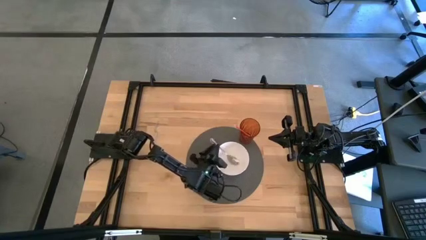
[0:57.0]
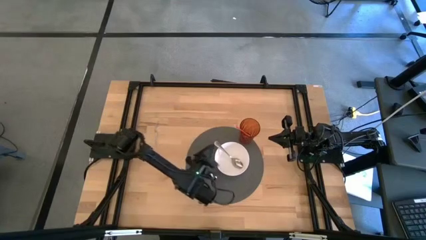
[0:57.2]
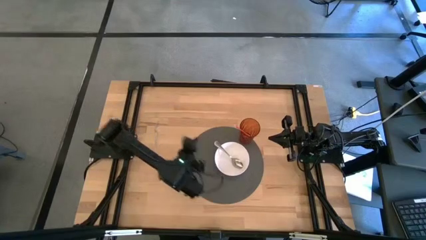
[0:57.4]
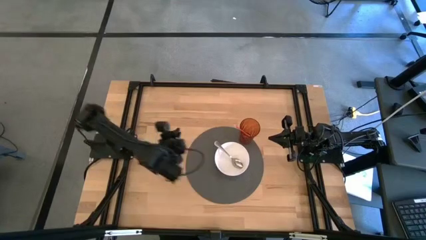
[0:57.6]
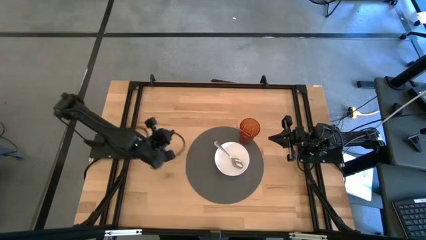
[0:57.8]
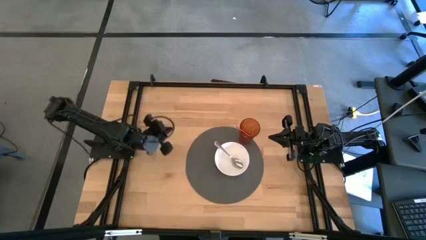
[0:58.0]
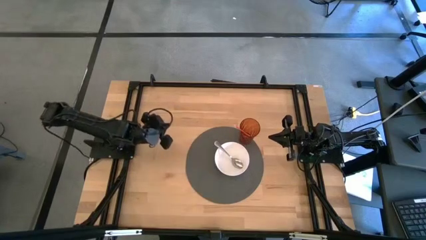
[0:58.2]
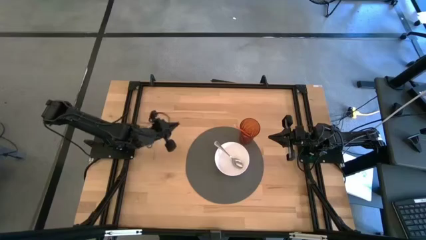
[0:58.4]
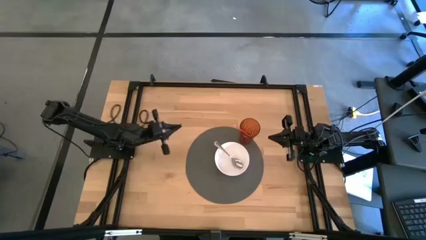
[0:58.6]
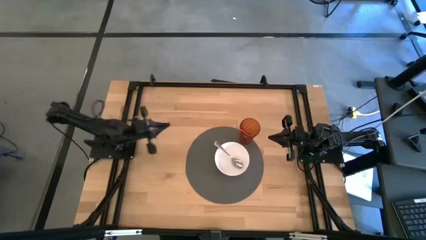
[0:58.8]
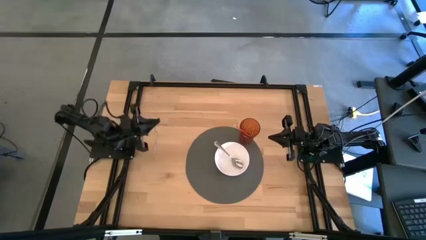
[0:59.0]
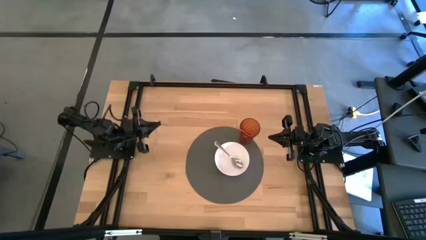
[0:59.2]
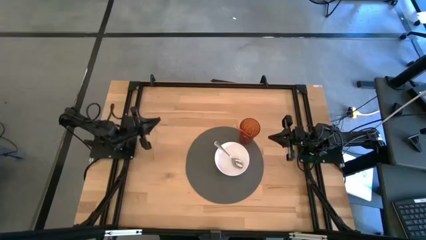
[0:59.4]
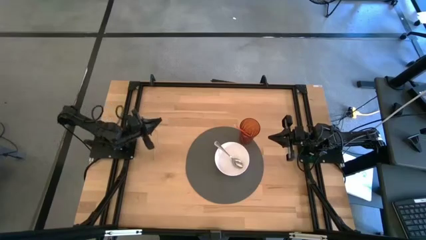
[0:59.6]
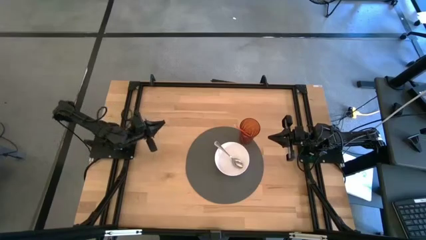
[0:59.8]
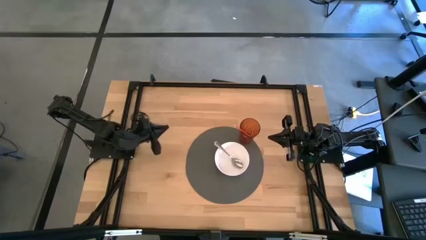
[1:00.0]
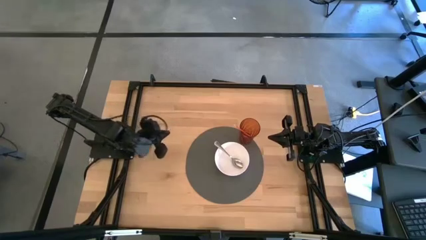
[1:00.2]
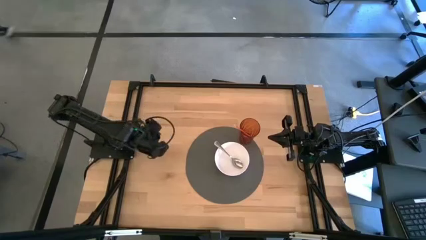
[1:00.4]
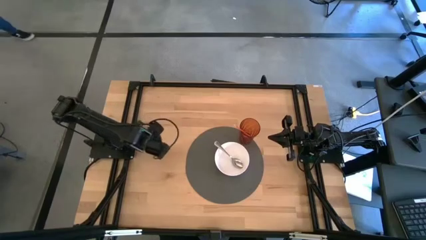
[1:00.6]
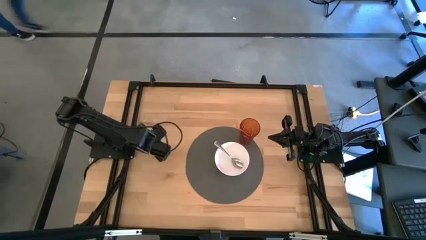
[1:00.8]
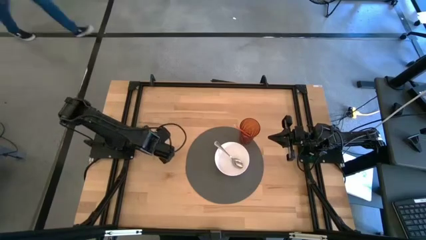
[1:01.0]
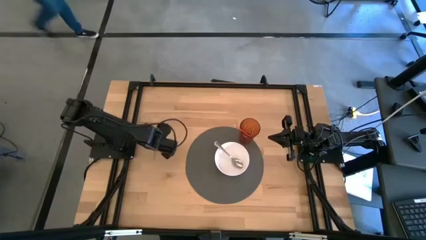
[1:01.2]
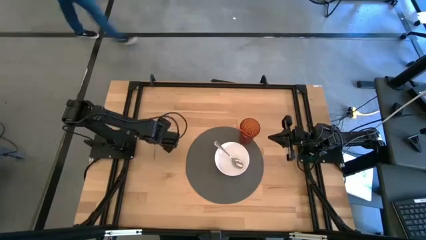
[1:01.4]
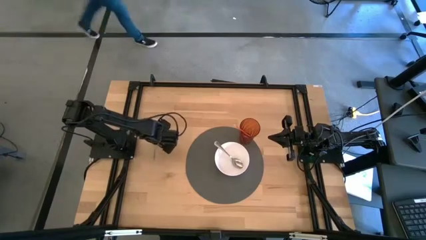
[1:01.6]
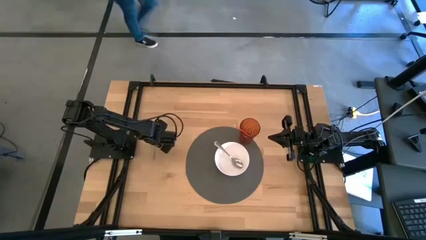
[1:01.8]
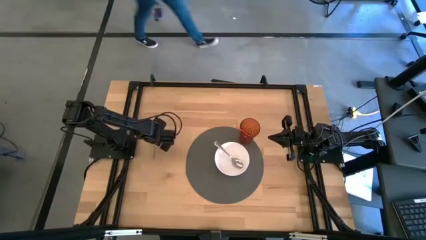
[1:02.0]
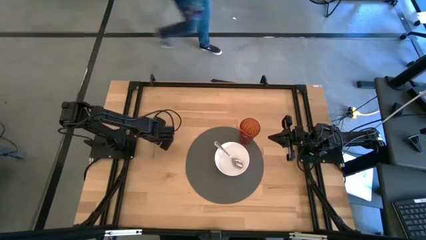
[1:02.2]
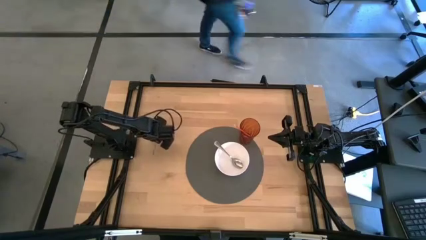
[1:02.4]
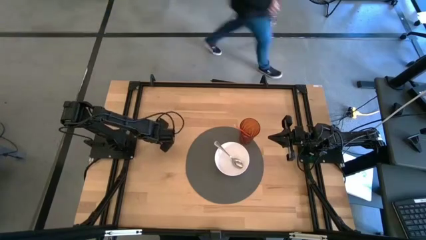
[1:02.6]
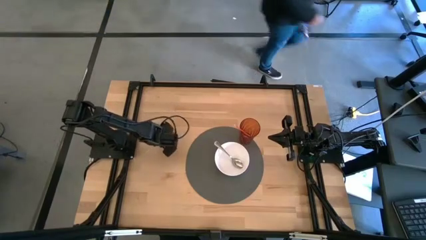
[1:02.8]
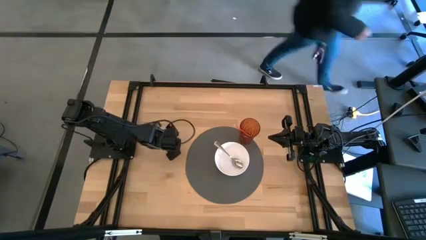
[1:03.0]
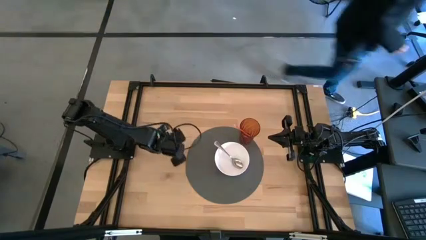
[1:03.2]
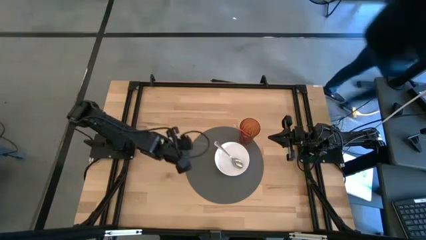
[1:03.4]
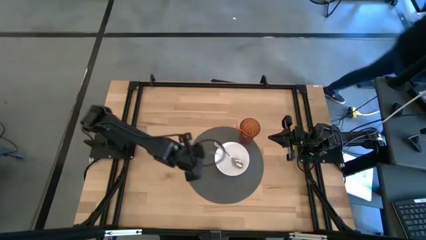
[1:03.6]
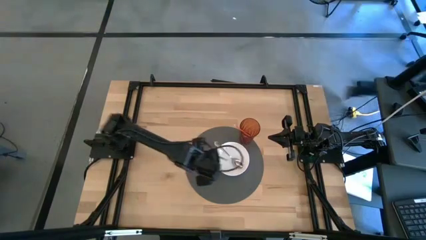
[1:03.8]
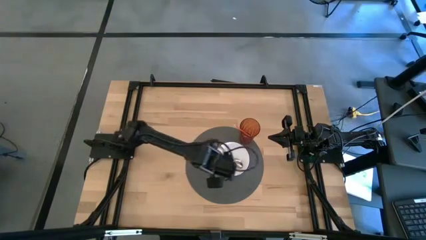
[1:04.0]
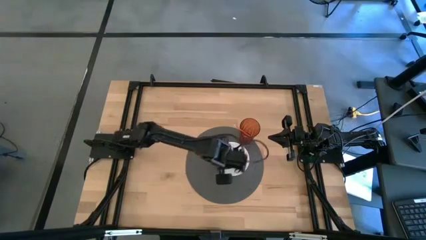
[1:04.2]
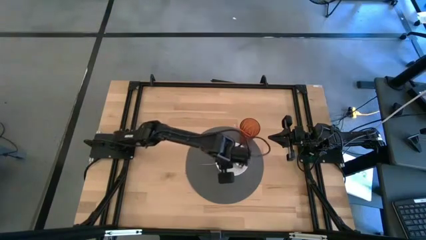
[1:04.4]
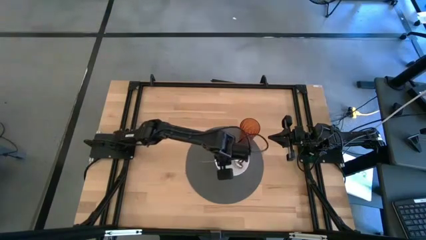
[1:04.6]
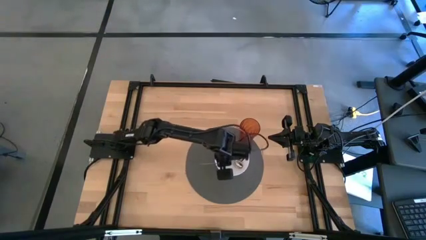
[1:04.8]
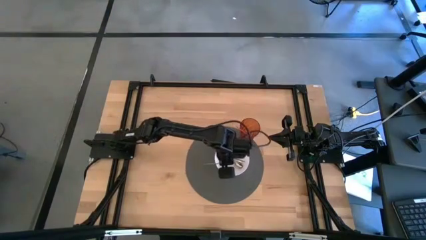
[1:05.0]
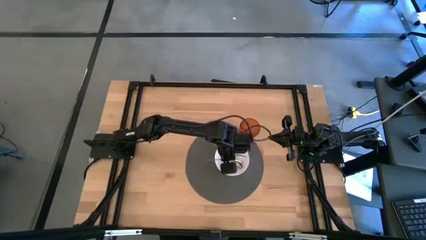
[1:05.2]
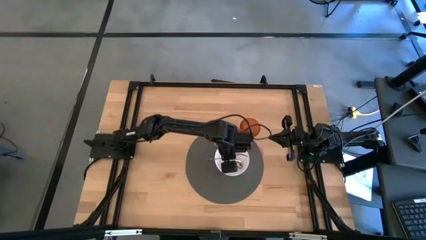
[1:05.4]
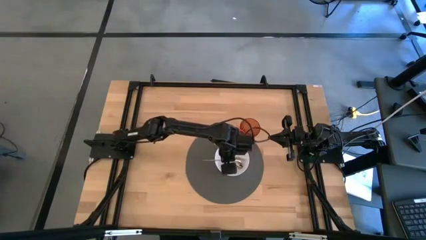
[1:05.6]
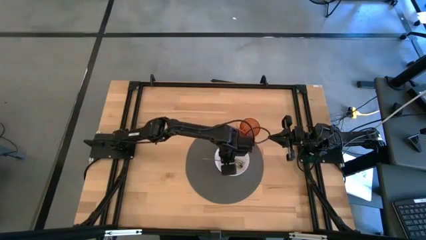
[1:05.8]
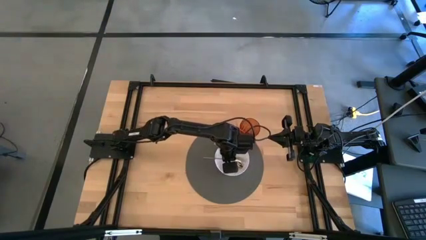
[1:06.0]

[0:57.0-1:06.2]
Task: Pick & Place Utensil
Put the silver fork into the white bowl on the gray mat

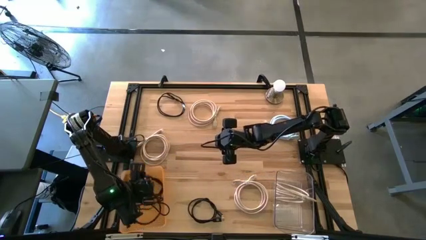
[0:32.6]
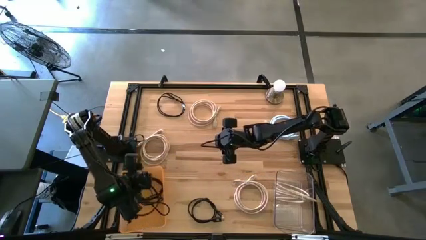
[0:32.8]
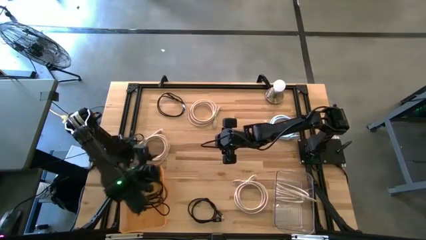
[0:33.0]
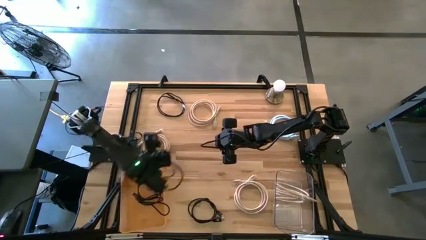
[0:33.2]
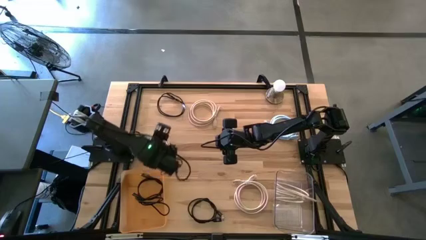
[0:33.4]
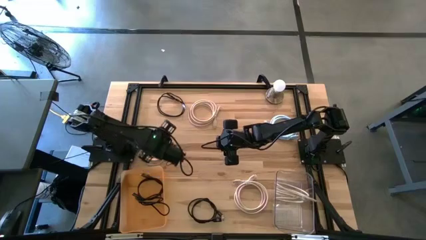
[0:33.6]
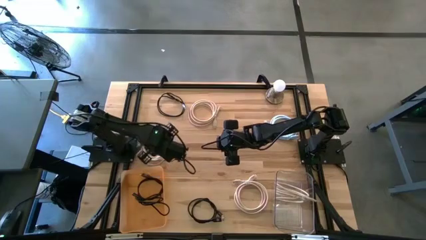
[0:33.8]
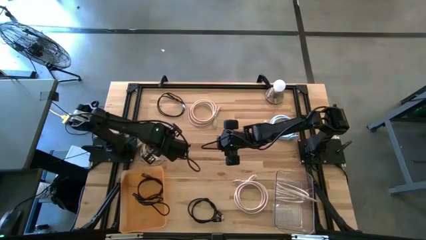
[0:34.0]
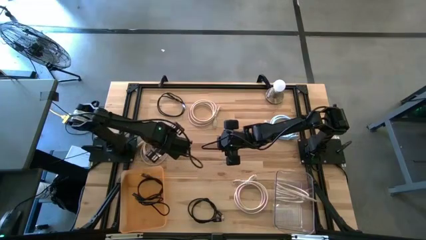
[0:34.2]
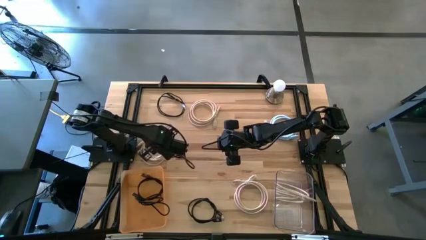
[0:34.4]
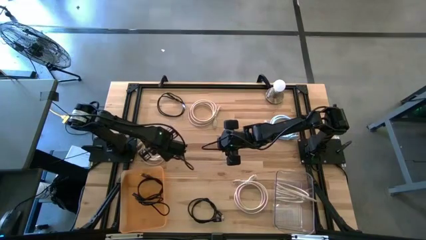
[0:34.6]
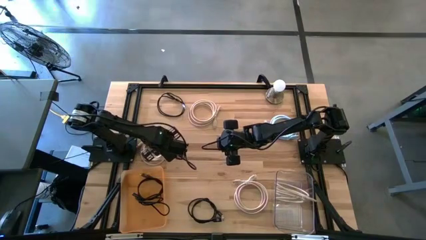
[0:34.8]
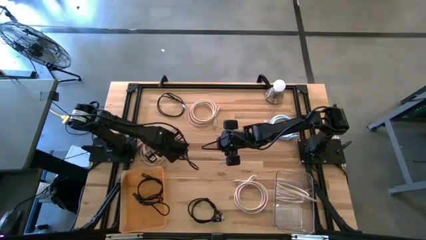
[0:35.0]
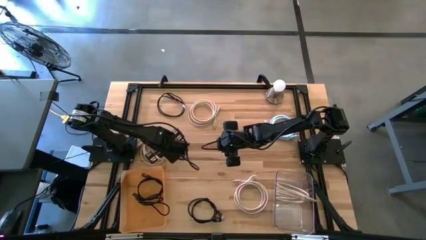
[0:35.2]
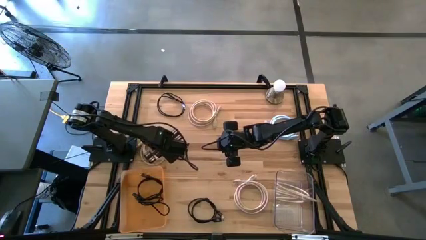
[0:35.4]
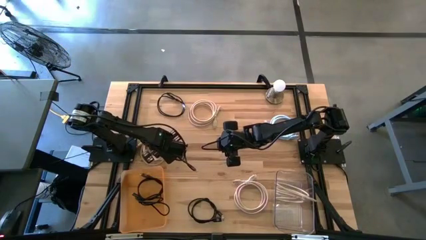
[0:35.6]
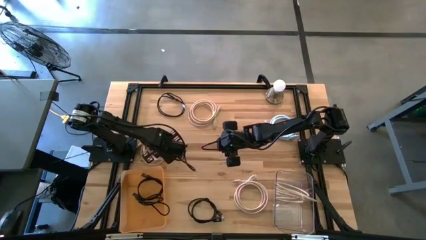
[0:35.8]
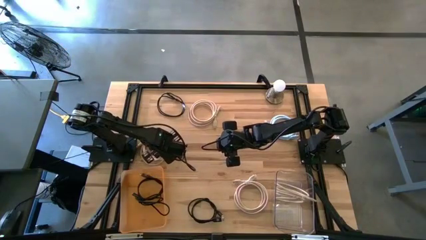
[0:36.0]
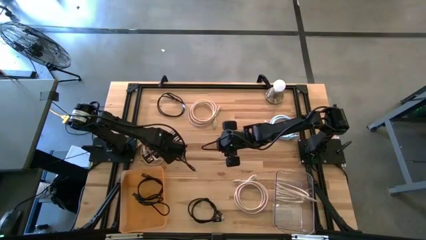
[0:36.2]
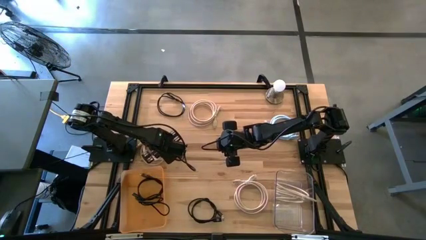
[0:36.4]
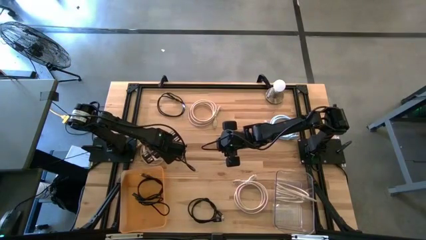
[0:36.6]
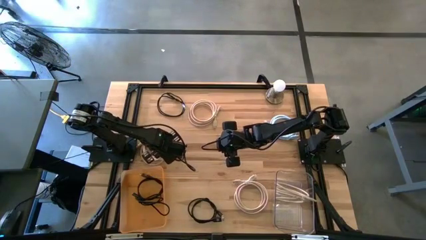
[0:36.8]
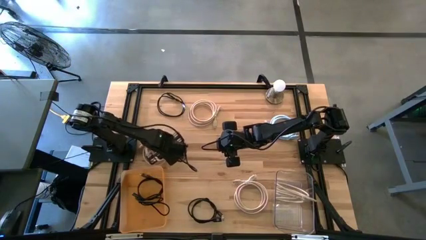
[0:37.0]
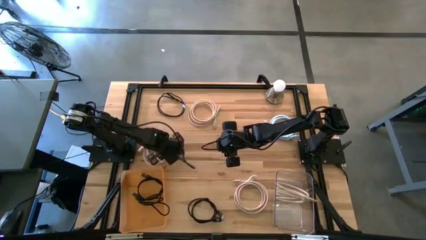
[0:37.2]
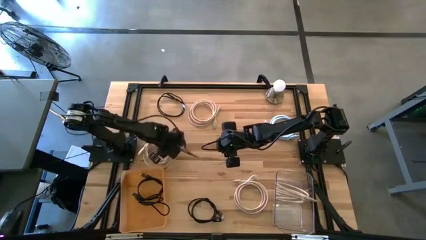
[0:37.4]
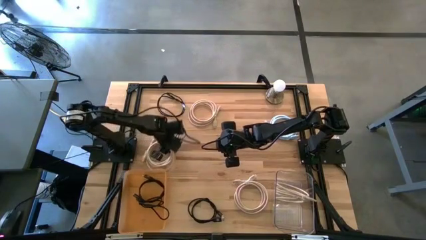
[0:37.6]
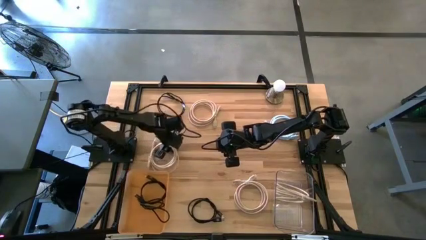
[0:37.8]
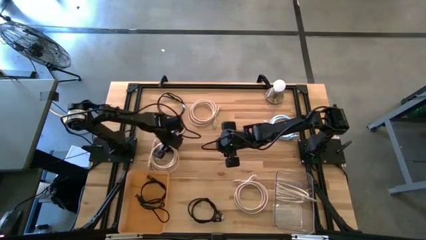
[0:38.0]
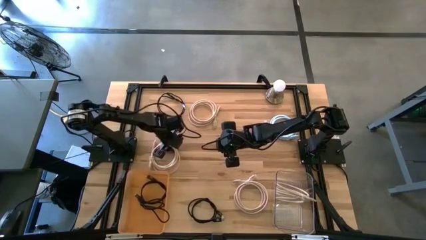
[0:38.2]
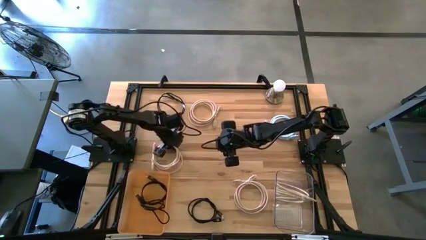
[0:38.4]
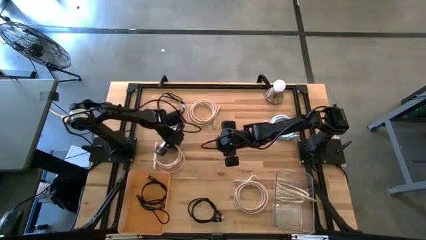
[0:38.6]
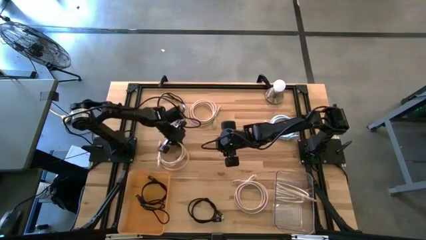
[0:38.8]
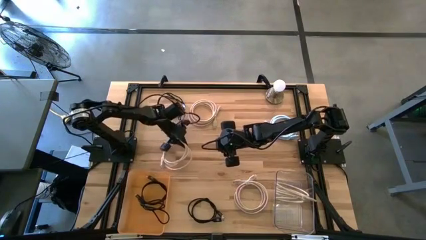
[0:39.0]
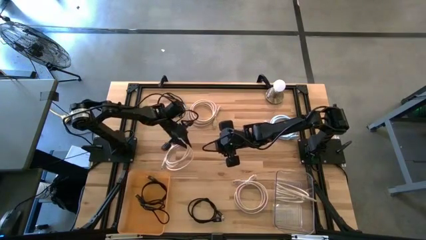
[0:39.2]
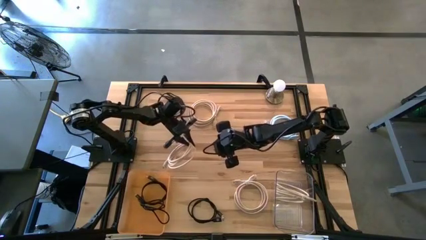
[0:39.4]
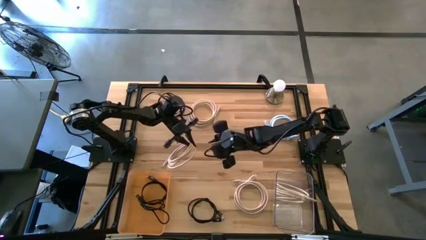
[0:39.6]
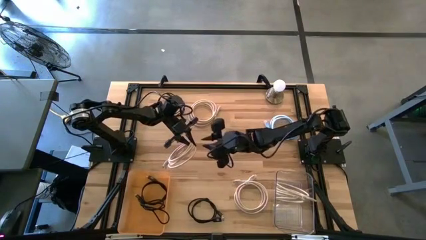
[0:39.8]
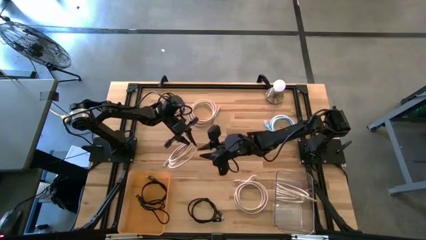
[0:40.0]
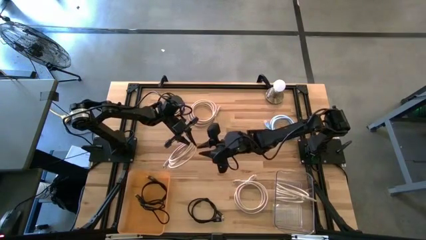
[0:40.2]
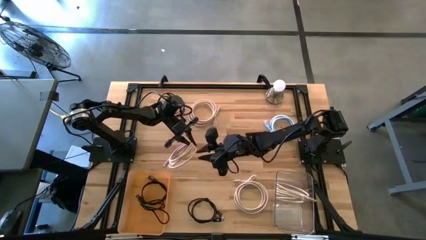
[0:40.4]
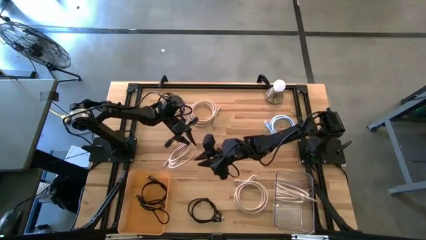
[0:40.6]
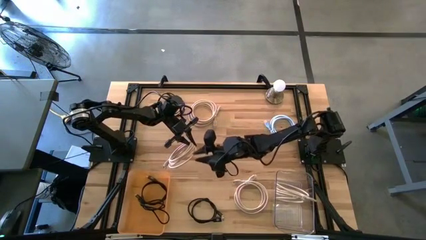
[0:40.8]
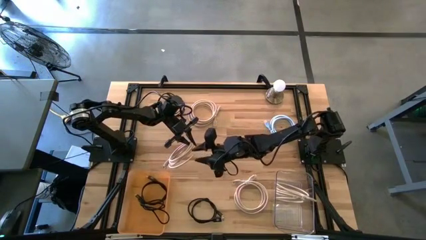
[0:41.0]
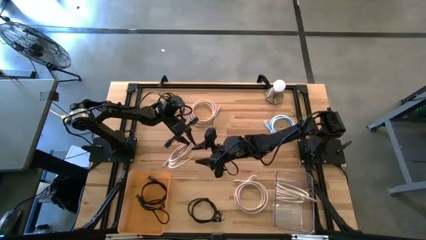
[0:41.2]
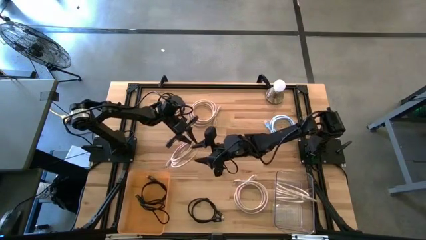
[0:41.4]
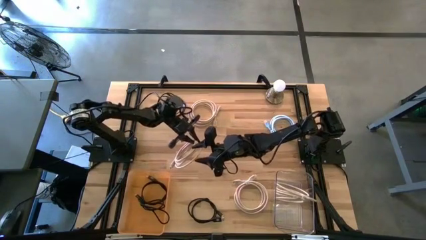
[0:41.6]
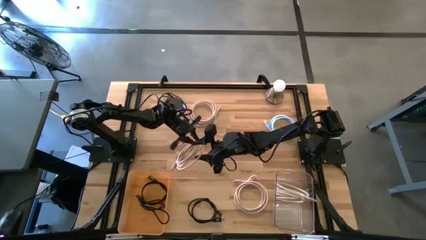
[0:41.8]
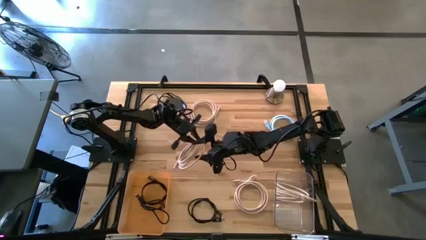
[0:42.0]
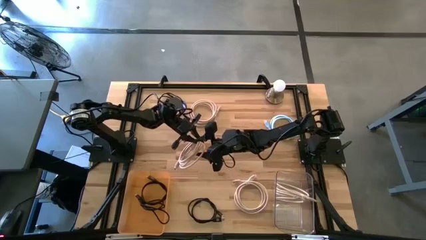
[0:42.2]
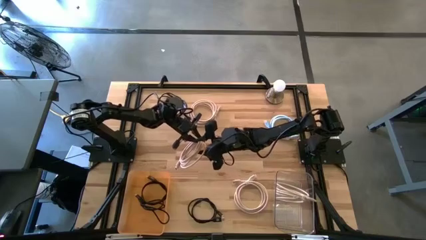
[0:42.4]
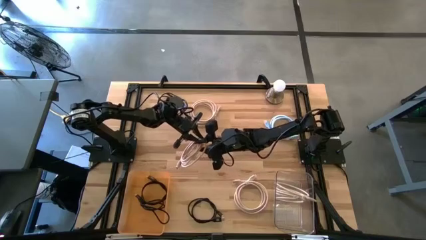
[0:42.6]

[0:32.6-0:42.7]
Task: Sort HDMI cables
Put the white HDMI cable into the transparent bin
